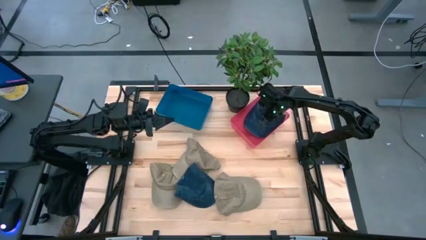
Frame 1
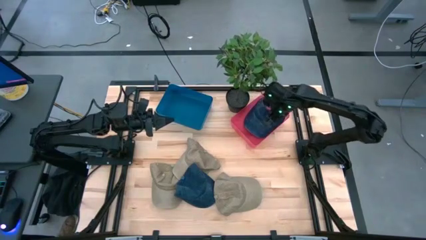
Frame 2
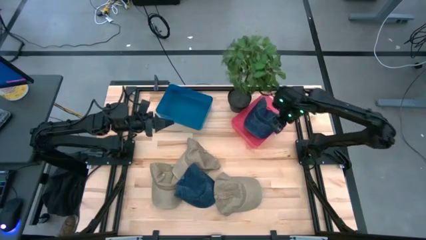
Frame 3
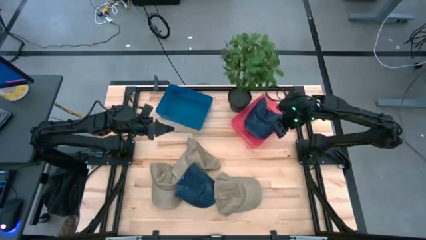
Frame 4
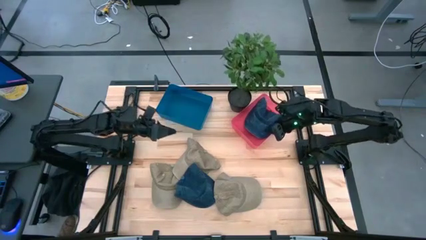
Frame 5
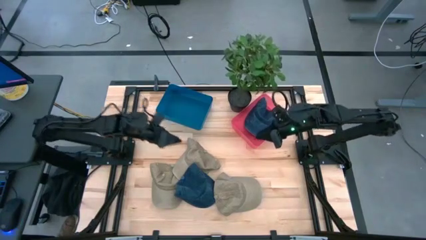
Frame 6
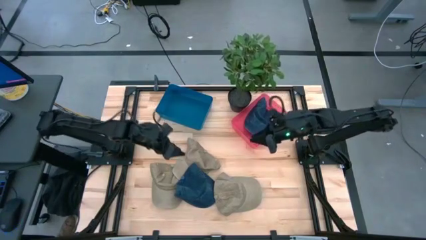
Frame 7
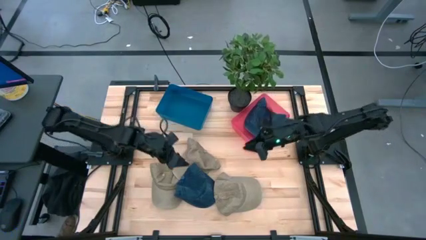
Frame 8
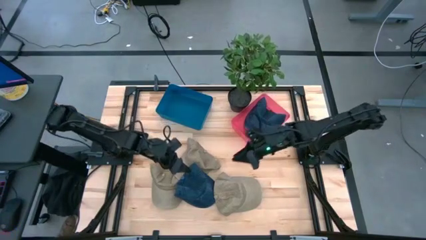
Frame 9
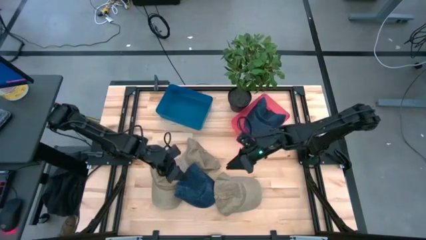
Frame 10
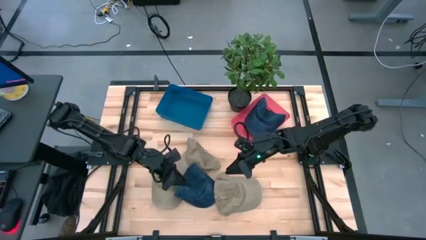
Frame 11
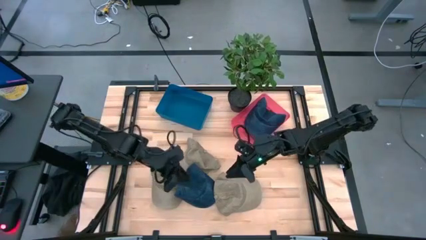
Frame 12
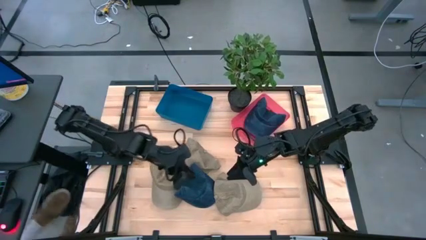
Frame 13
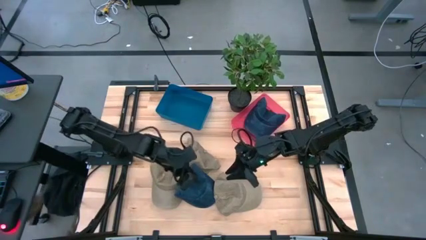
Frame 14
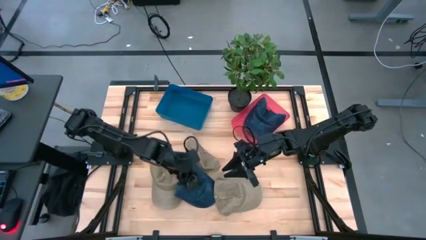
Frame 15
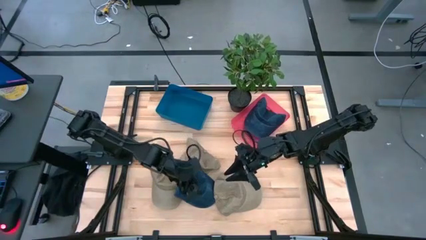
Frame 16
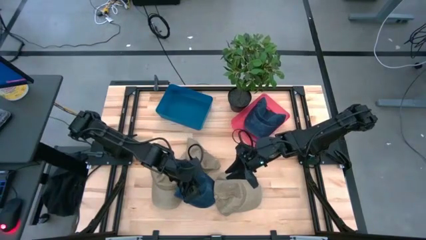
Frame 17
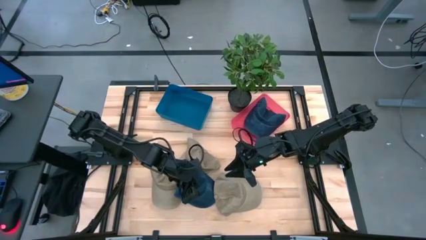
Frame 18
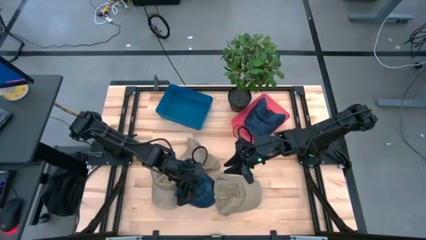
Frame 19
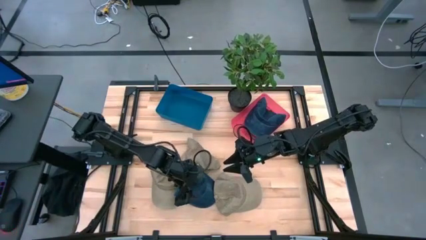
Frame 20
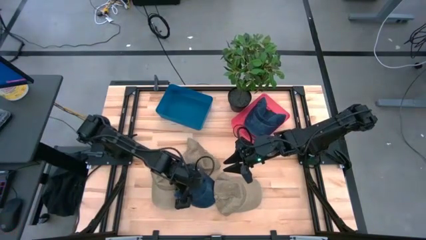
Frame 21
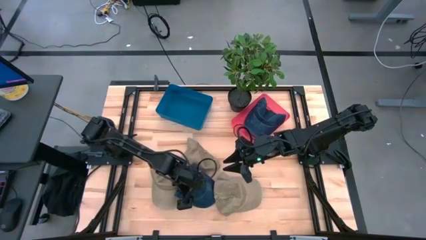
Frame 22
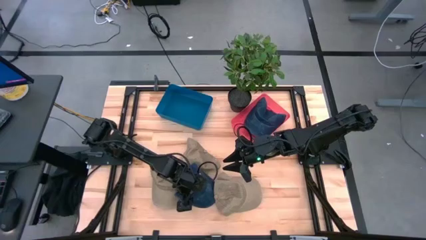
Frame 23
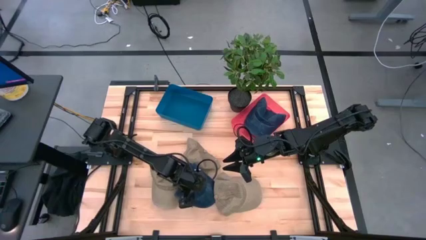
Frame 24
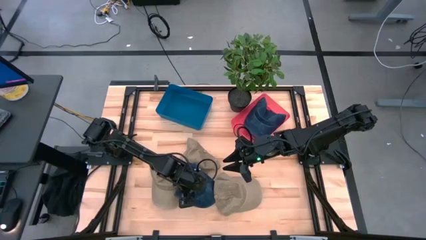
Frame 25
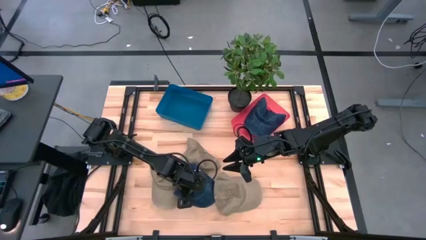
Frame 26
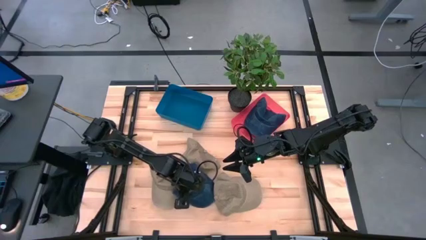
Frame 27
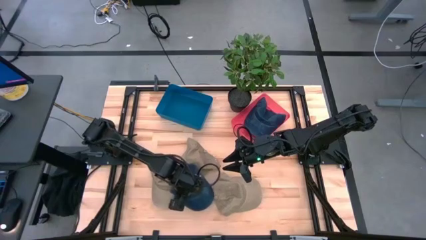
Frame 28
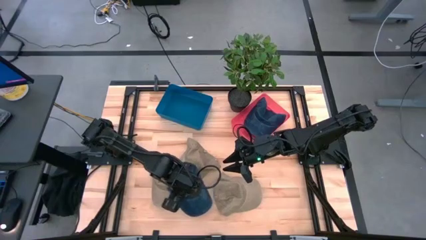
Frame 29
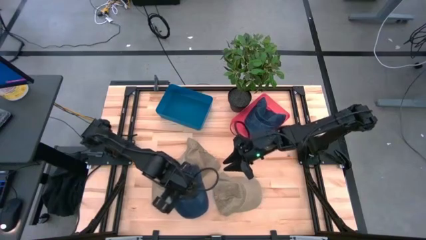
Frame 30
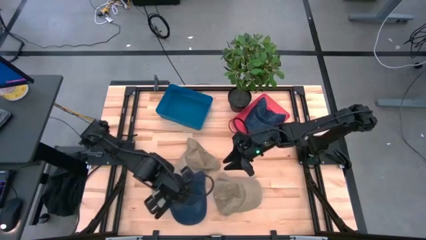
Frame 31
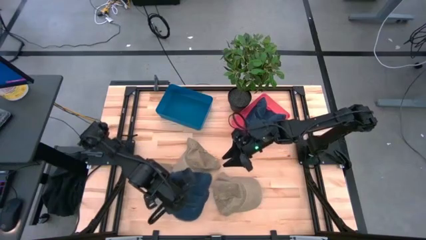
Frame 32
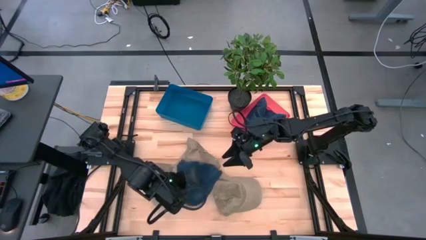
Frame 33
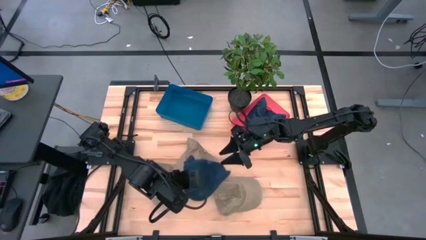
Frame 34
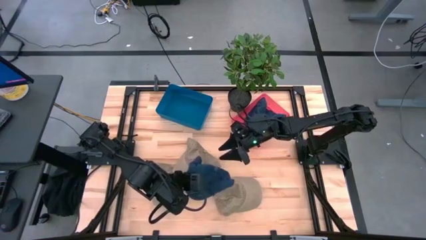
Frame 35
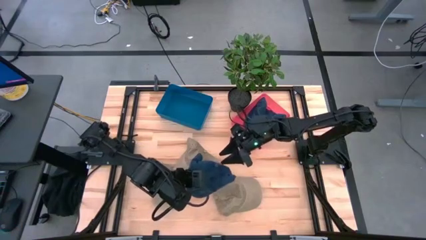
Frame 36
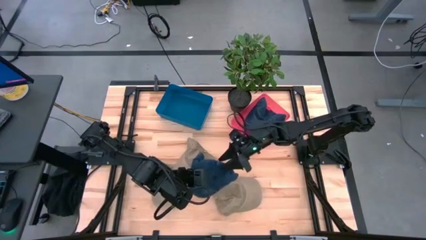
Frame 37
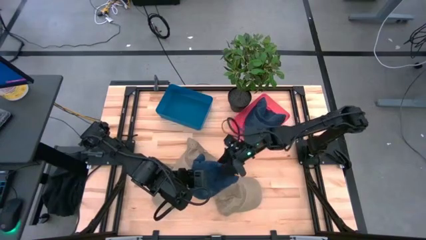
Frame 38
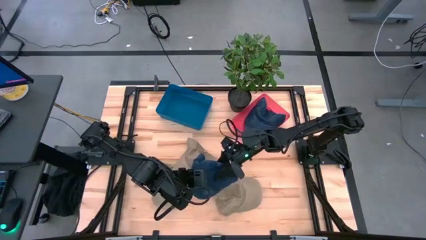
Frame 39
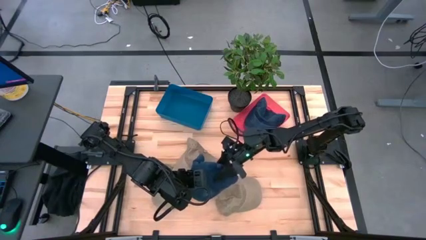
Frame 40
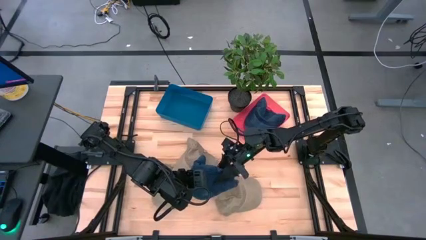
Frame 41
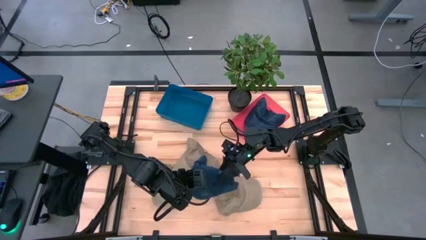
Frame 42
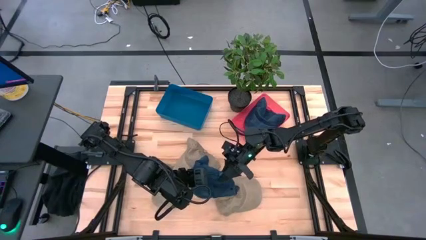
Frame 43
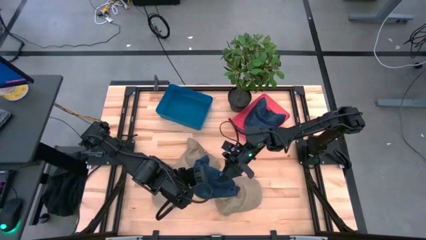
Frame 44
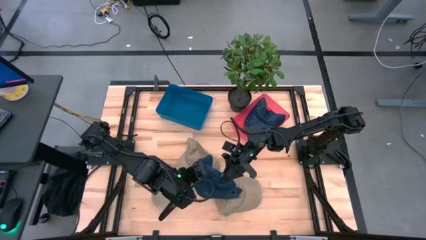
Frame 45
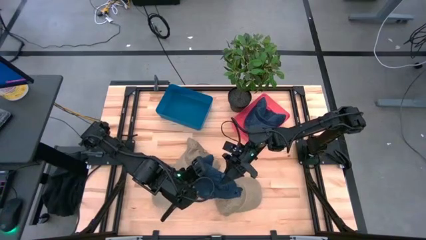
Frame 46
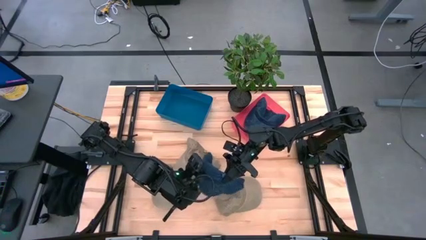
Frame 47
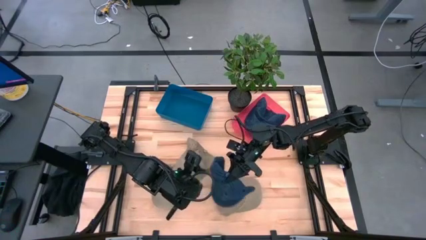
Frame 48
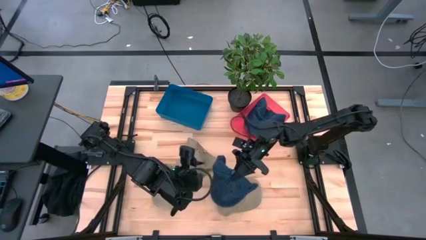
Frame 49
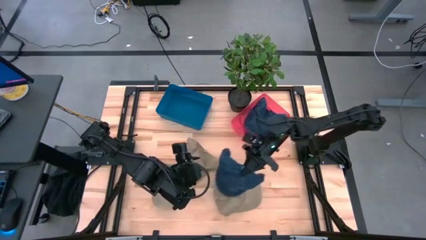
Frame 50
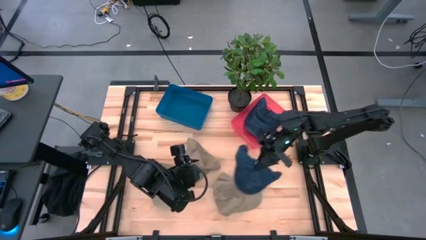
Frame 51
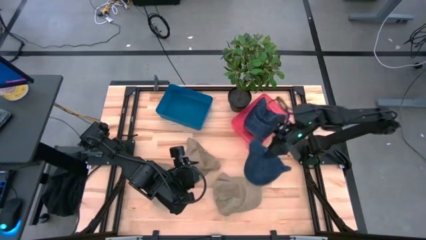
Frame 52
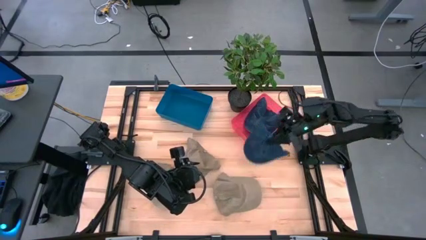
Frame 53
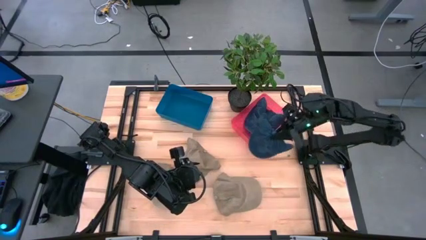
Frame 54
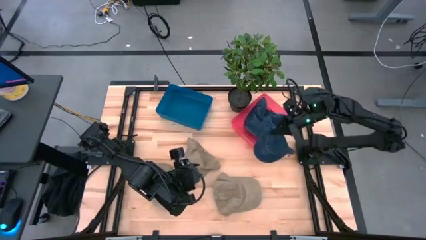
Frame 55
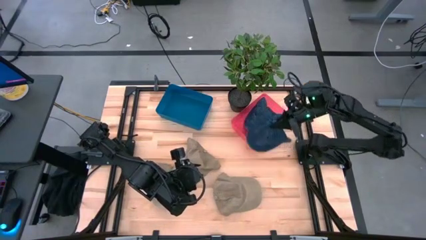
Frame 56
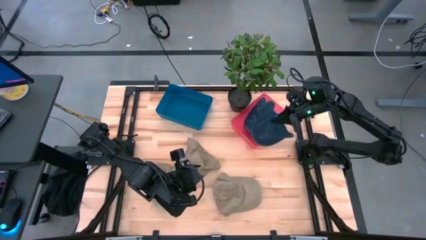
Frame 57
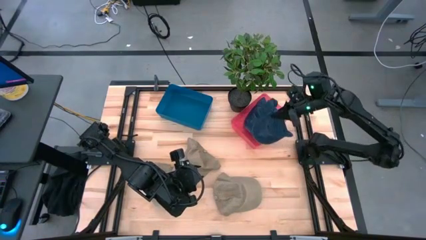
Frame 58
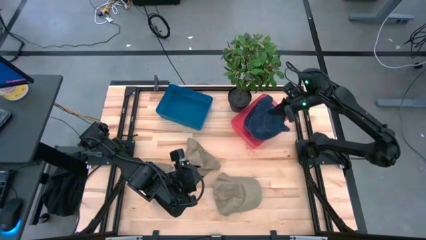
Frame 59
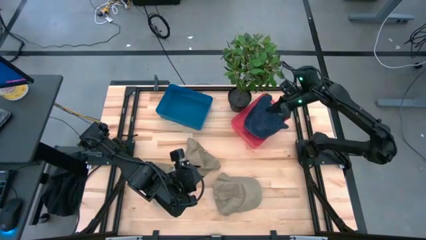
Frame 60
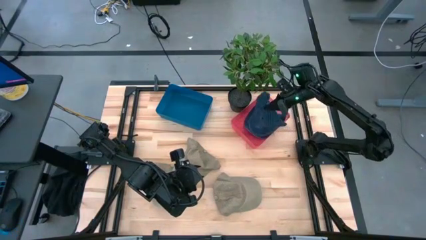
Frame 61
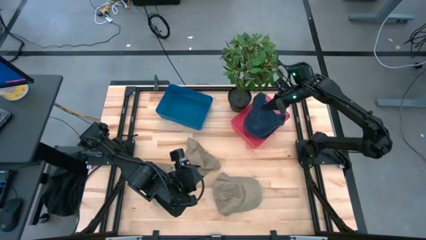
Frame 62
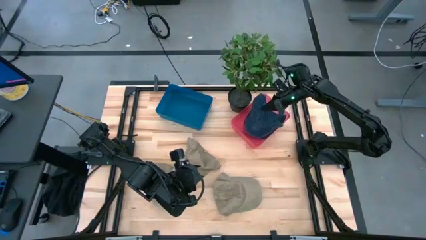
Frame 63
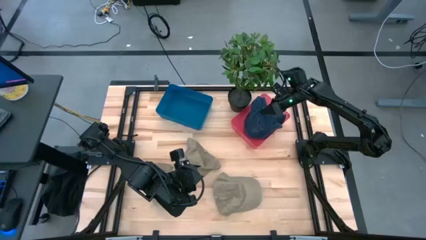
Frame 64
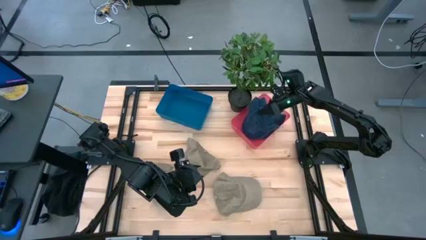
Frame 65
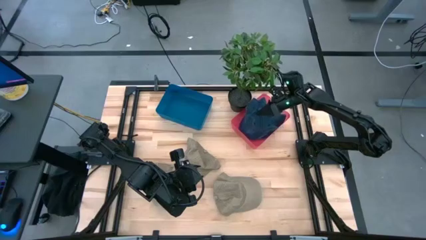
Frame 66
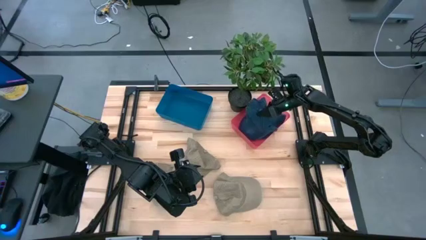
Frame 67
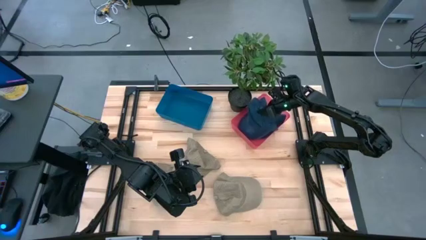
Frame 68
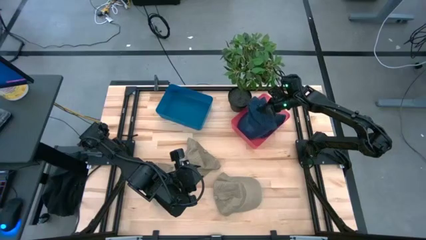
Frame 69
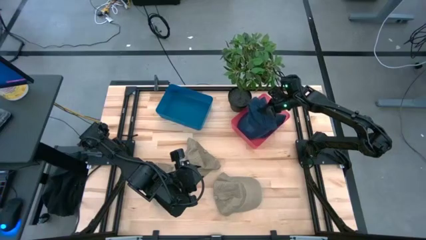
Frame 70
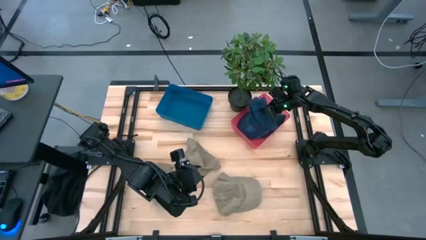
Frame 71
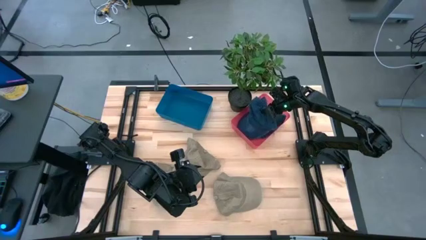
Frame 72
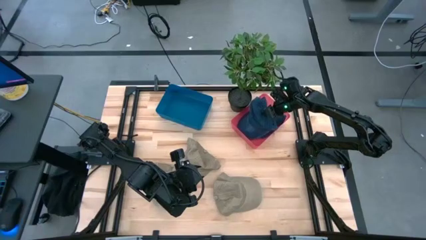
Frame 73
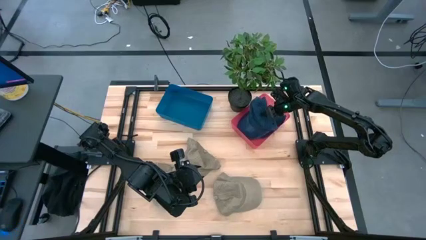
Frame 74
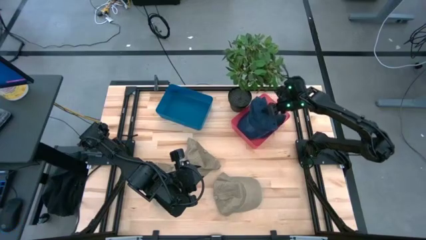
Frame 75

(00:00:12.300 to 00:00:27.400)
Task: Pick & Place hat
Put the blue cap into the red bin
